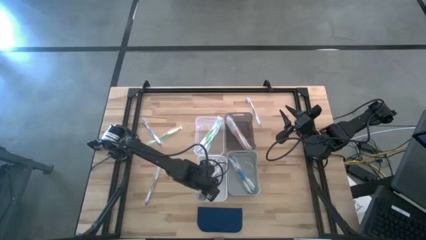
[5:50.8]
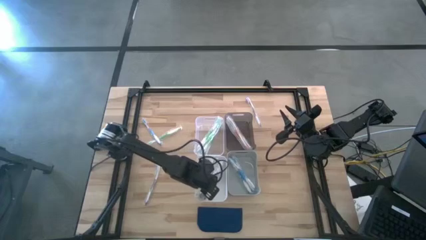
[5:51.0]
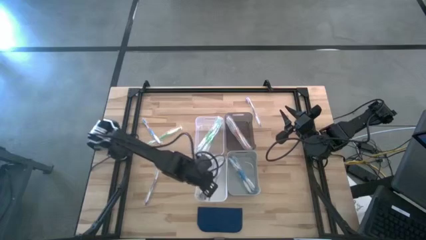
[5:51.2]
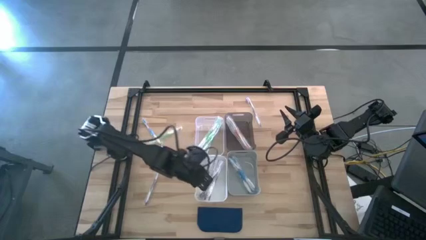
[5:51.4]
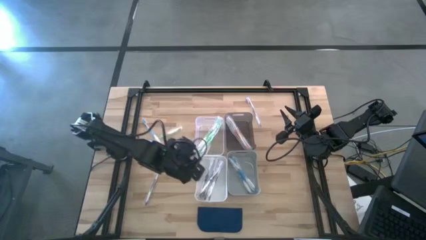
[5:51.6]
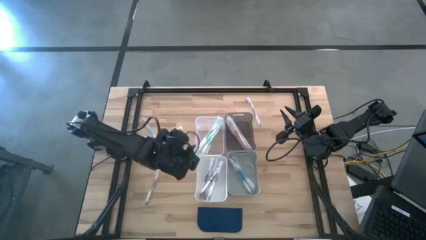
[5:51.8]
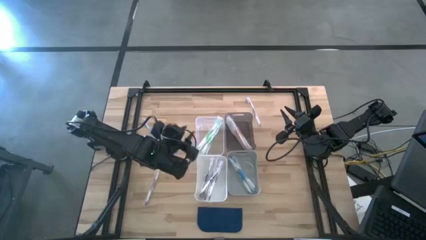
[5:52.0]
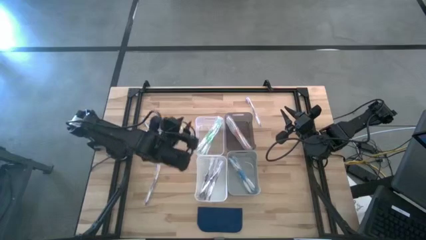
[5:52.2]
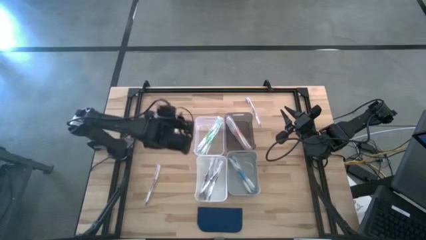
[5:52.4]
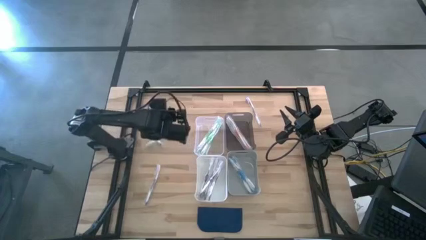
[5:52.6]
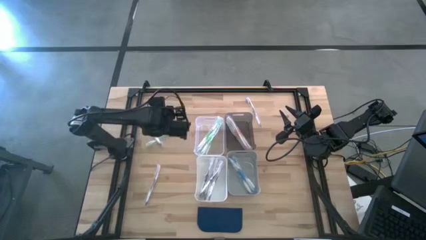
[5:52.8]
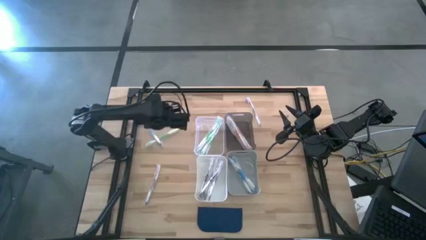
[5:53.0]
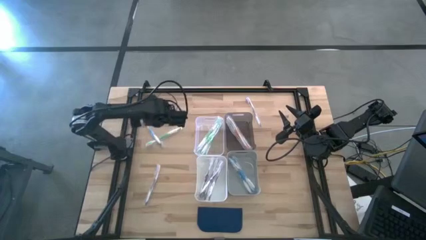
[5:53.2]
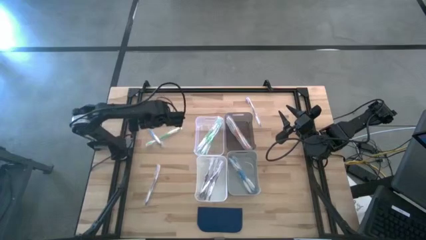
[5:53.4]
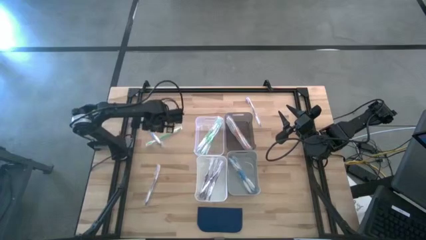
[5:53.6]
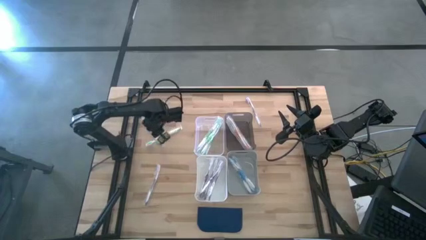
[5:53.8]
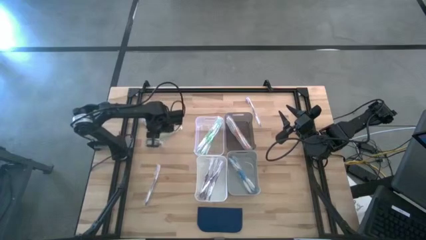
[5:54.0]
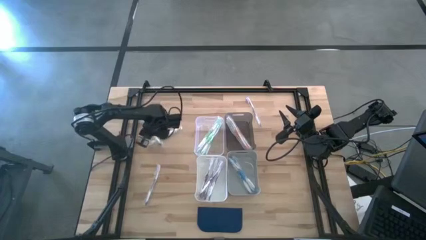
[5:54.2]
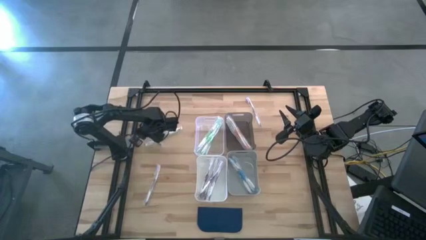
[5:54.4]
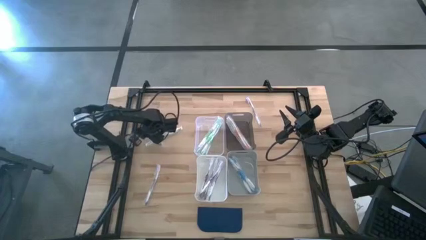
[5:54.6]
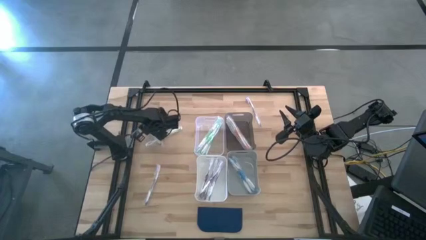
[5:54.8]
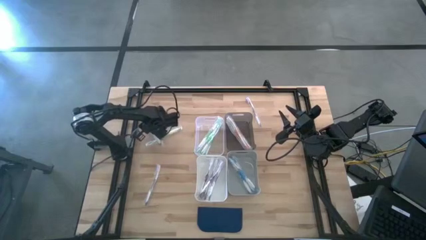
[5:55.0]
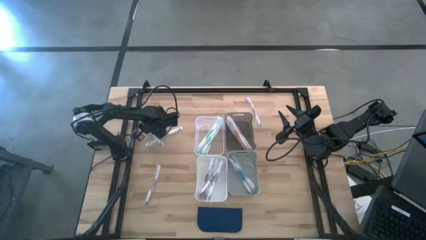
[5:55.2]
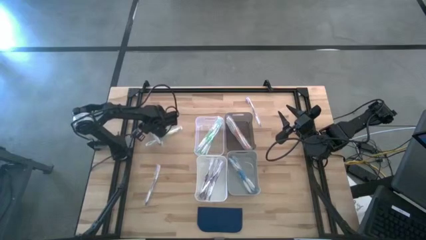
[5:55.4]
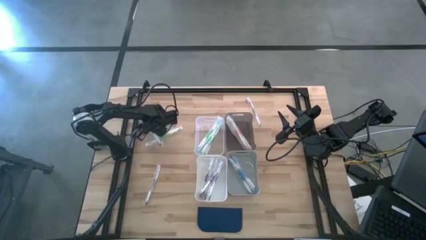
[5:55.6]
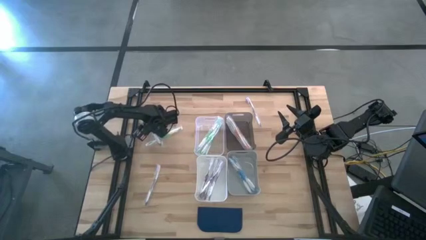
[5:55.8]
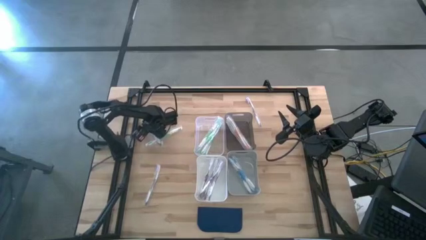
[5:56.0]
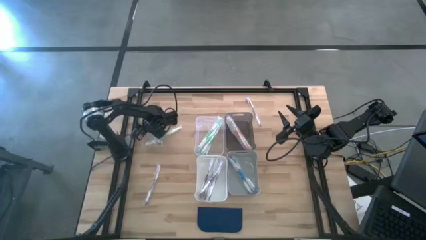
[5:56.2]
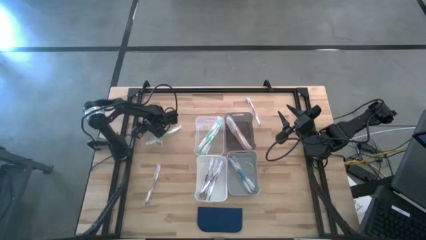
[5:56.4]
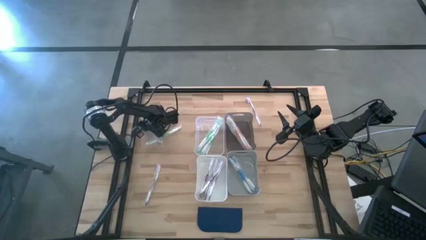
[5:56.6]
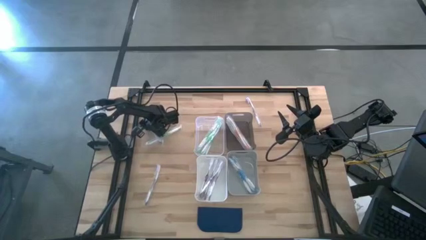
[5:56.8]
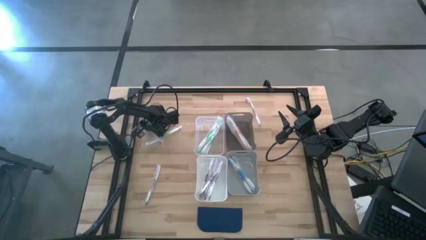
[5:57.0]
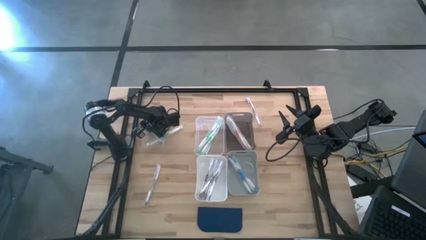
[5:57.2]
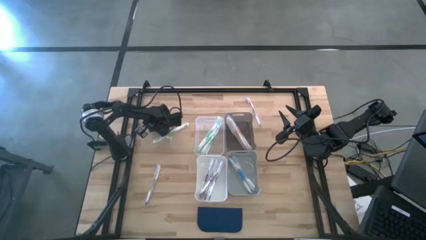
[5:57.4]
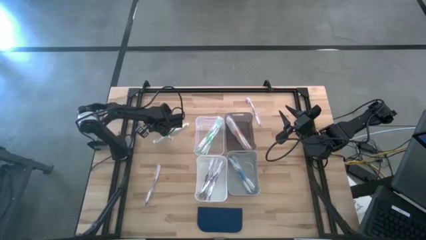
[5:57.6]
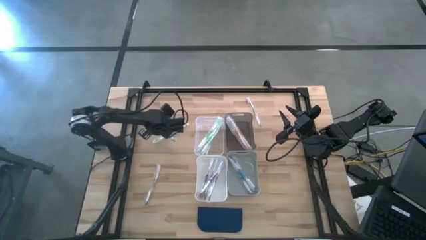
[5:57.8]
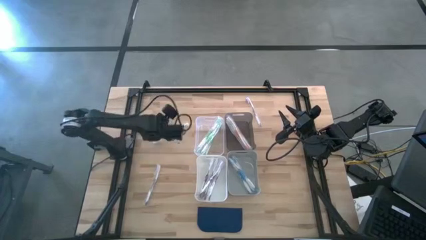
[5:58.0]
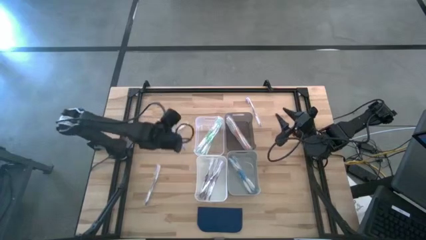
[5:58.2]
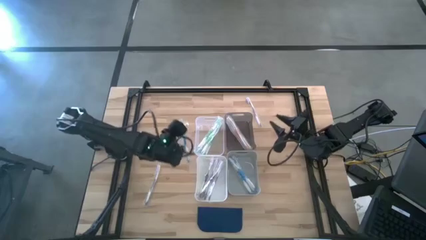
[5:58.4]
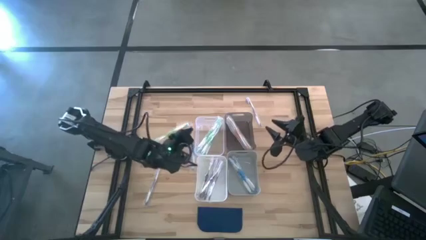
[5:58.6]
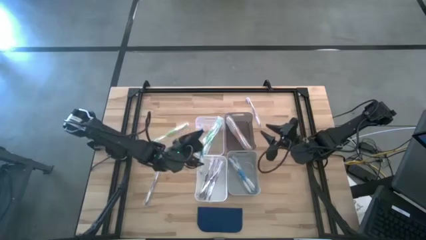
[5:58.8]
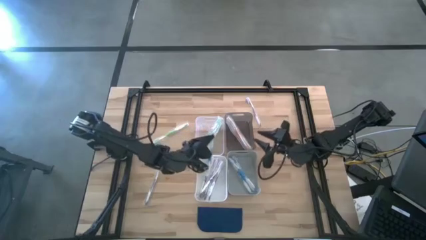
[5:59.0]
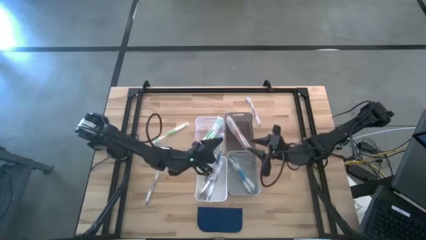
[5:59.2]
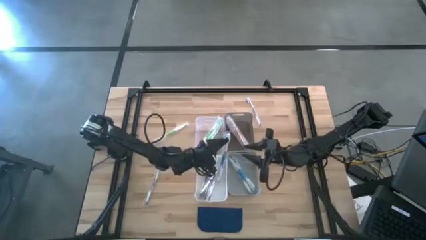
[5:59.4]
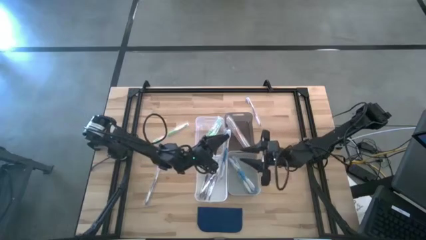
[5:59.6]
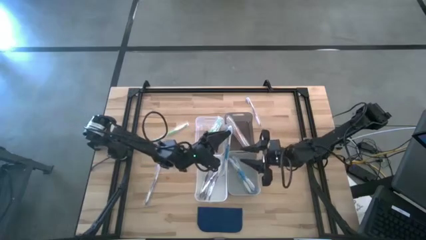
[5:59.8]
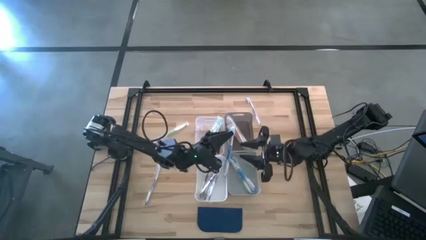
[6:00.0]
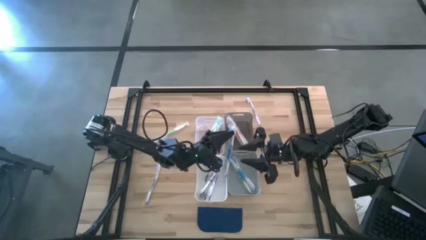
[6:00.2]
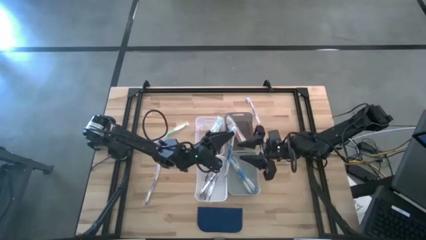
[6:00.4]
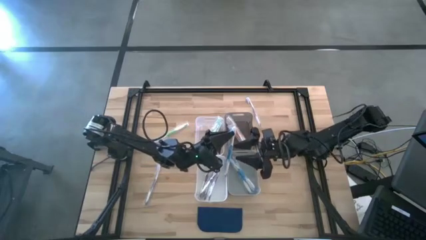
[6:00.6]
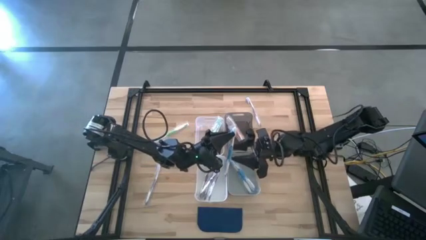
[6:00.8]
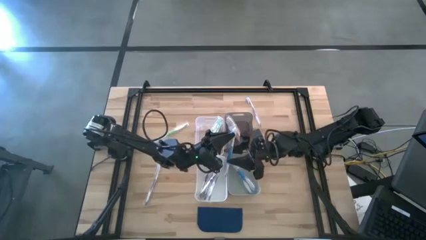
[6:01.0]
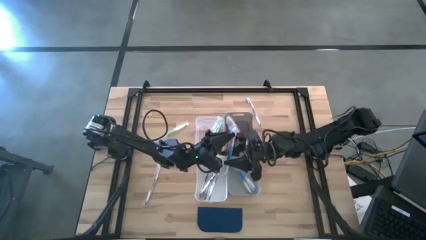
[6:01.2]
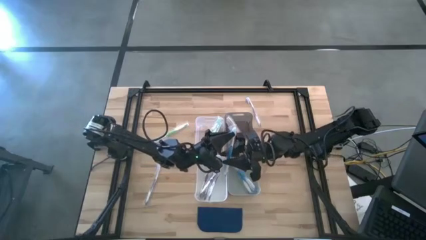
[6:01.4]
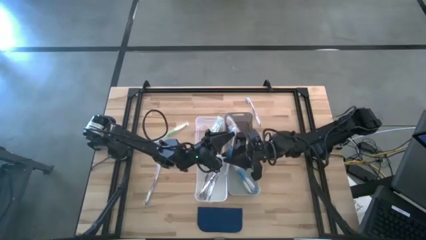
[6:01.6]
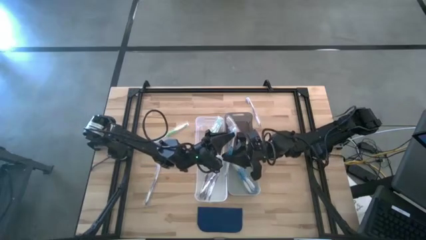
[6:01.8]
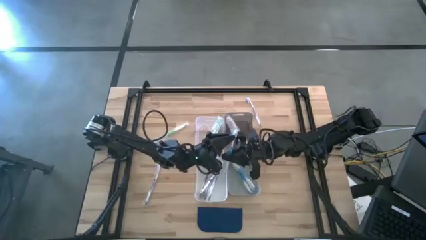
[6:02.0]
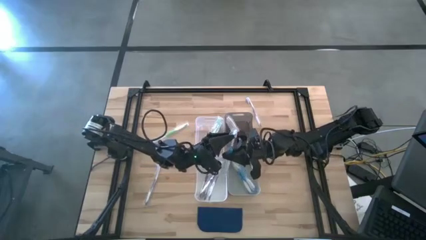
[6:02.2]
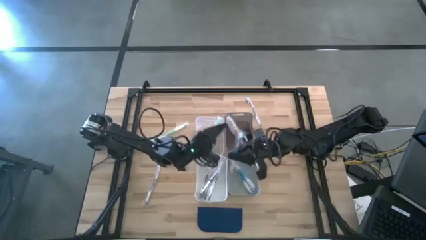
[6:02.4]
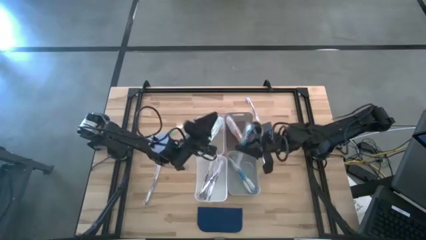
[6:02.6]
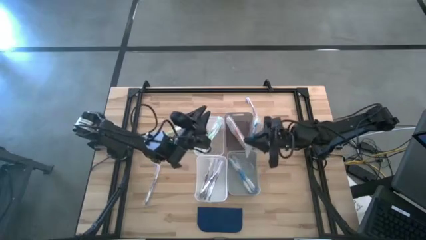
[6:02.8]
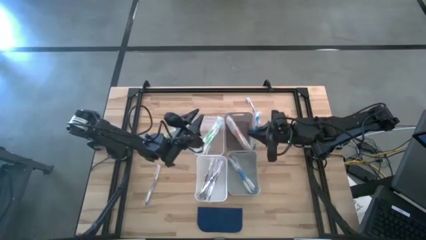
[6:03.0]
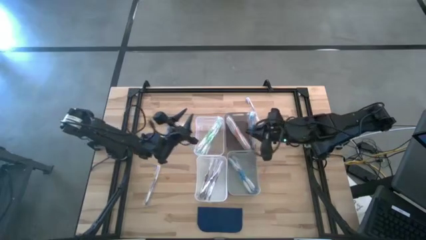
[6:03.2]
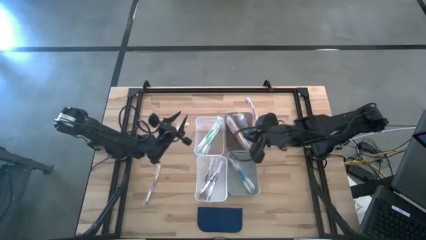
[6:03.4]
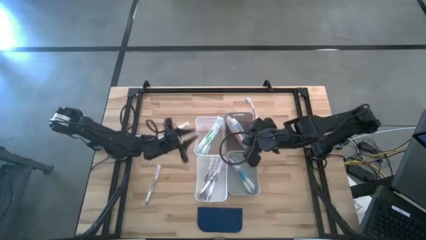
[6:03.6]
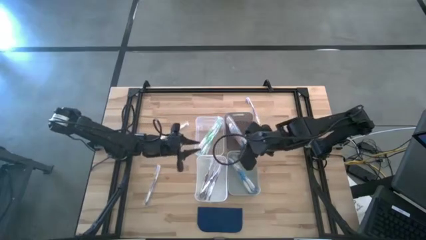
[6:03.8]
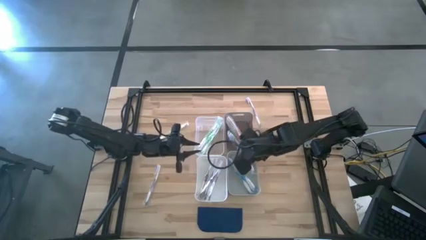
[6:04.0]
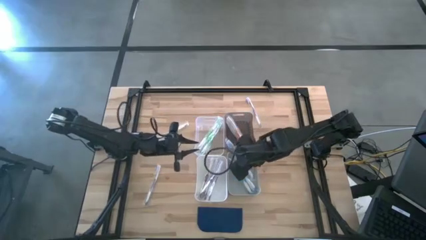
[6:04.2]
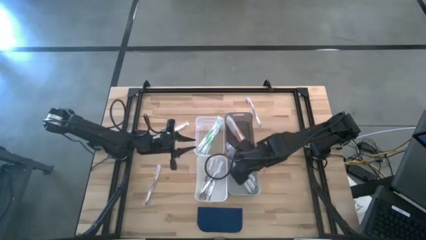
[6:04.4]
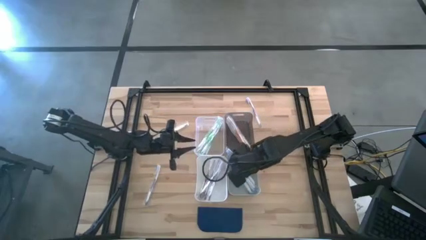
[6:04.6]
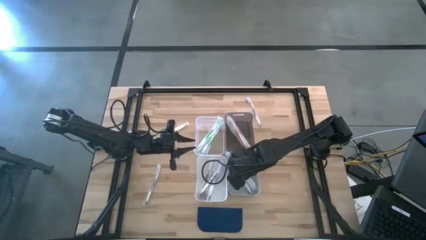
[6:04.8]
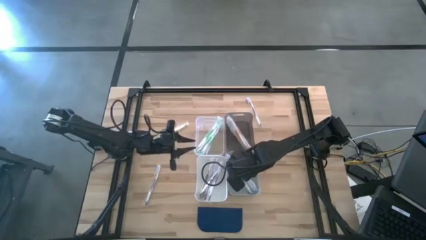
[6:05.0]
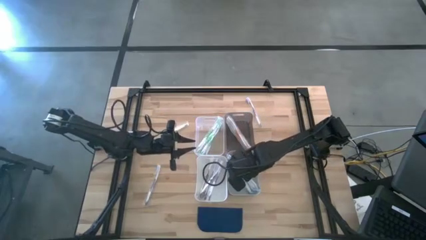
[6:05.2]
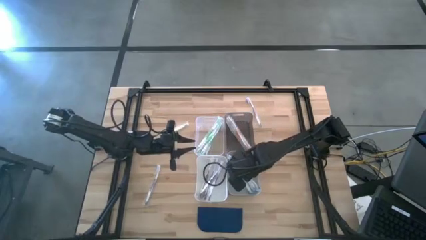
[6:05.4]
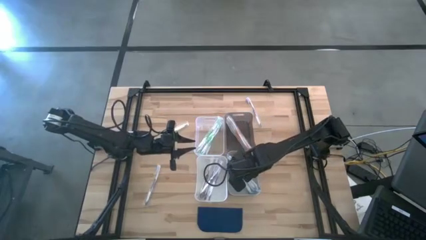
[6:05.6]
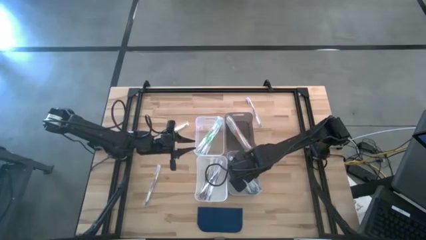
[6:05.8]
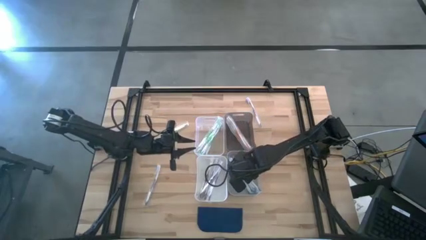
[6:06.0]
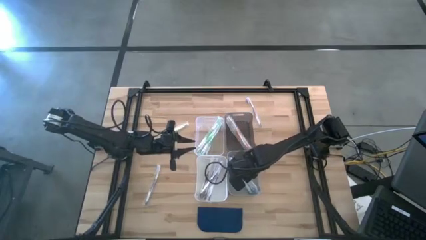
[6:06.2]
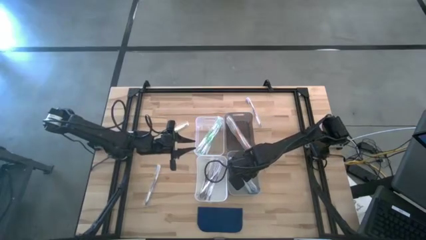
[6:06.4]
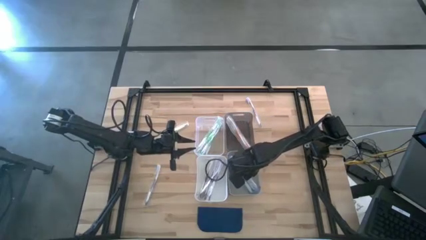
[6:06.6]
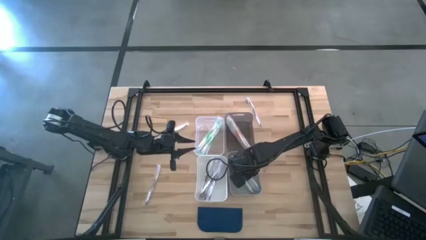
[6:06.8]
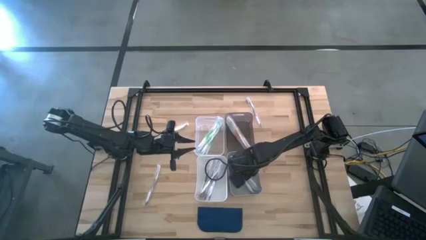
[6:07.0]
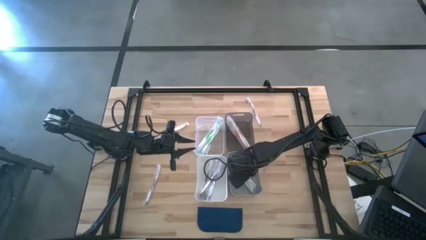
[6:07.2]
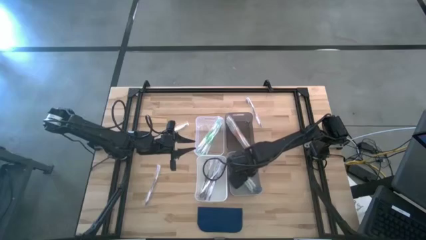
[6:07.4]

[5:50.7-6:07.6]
Task: Pick & Place Toothbrushes
Put the blue toothbrush into the gray bin
